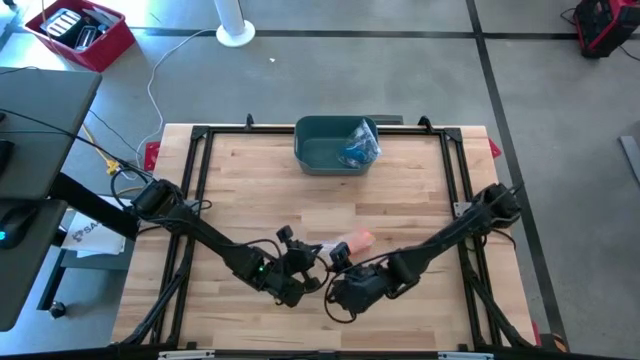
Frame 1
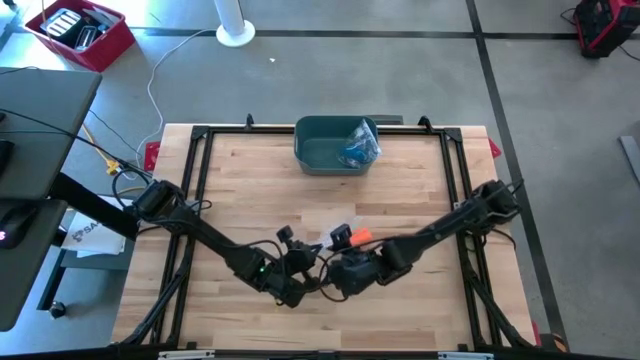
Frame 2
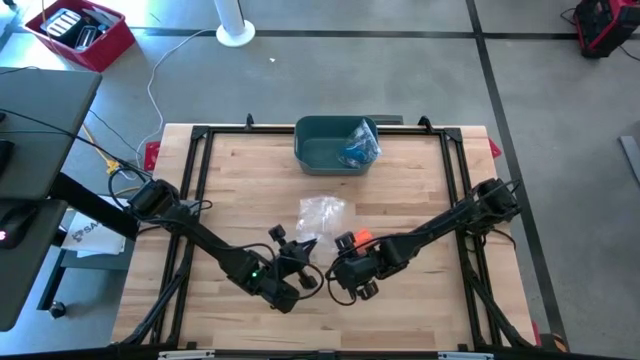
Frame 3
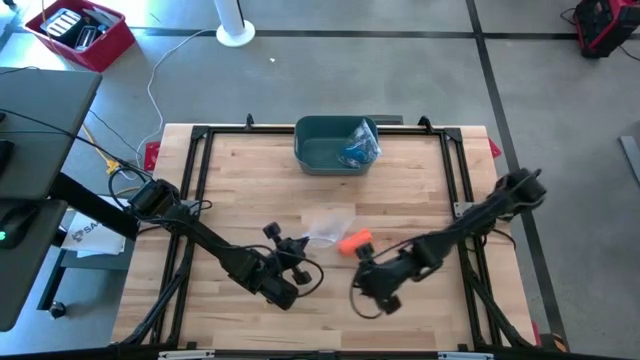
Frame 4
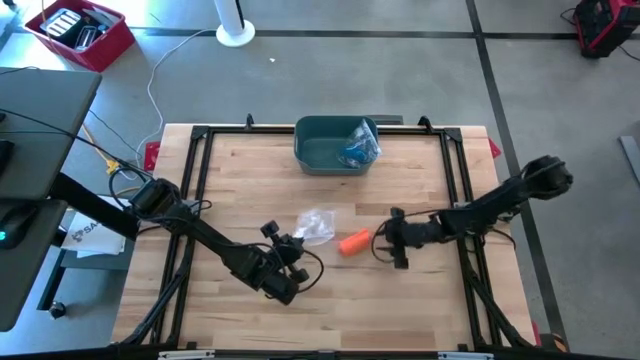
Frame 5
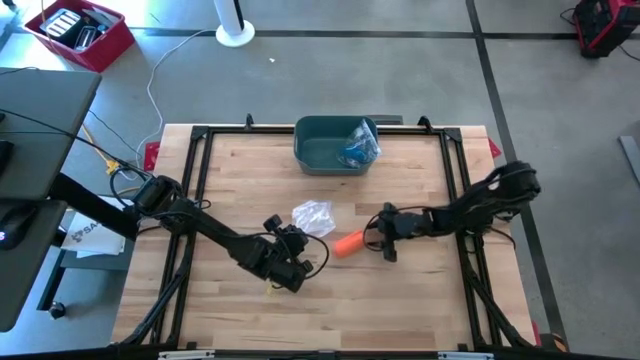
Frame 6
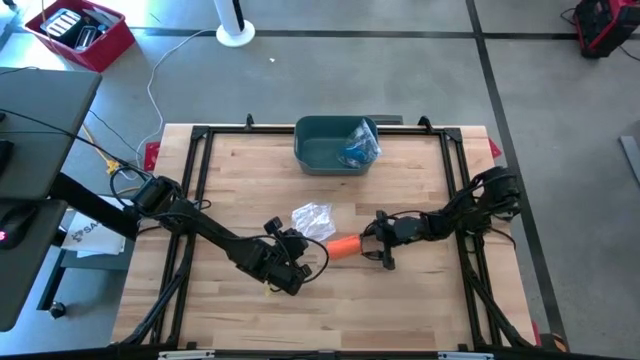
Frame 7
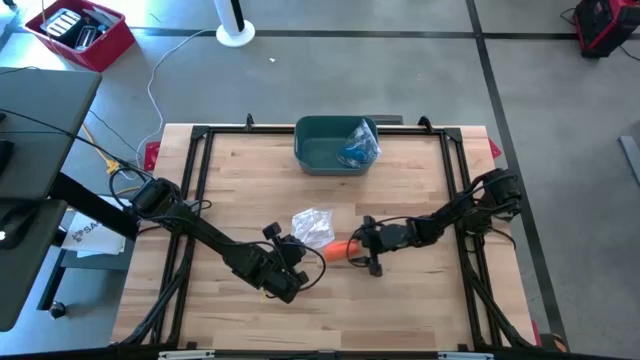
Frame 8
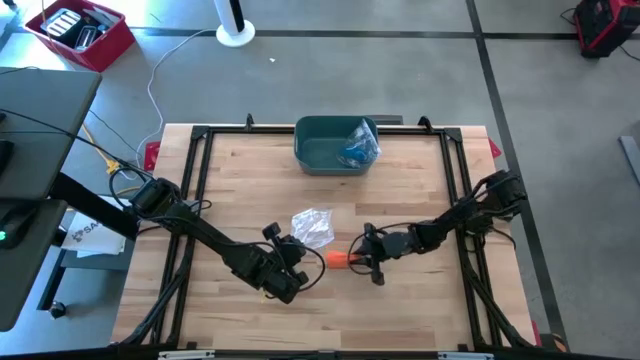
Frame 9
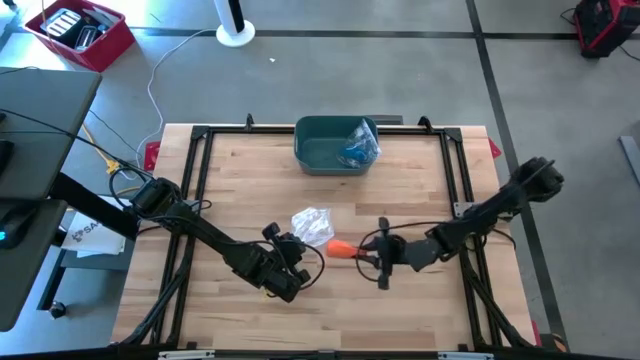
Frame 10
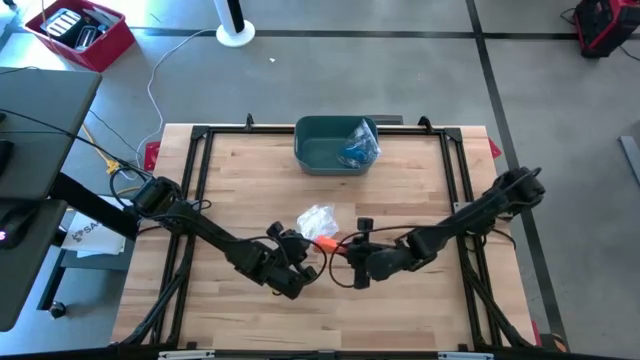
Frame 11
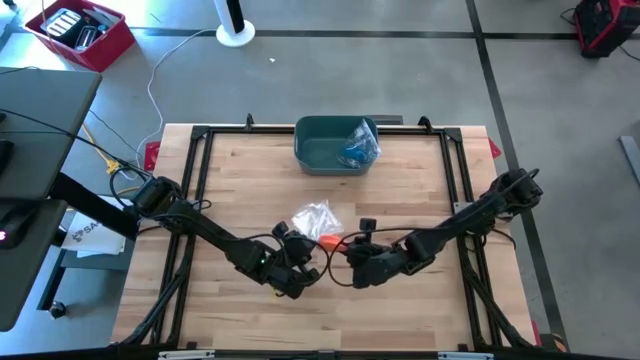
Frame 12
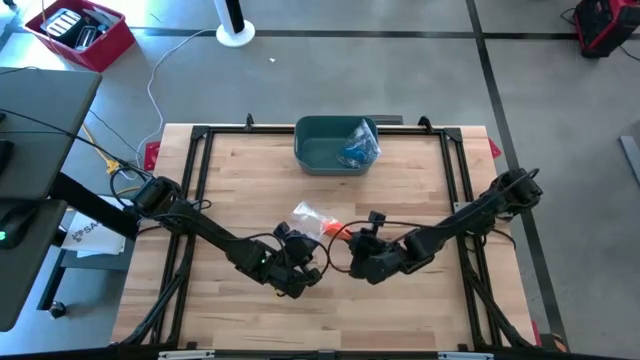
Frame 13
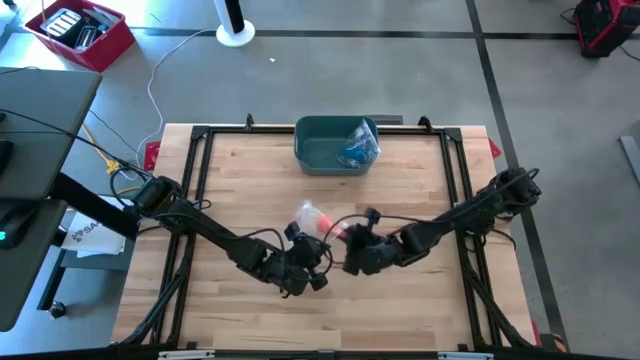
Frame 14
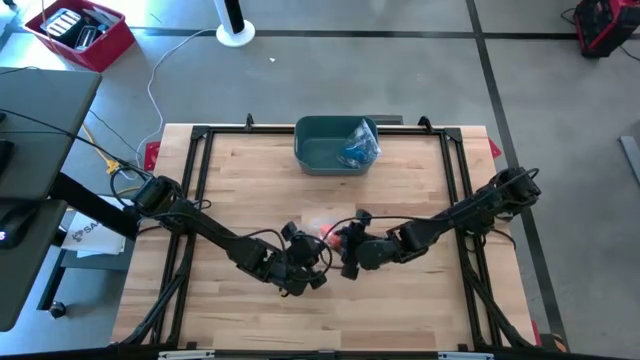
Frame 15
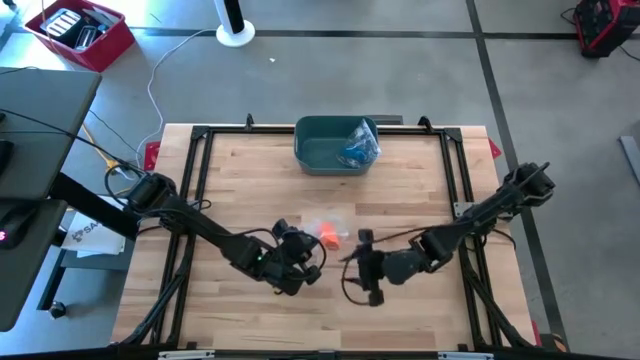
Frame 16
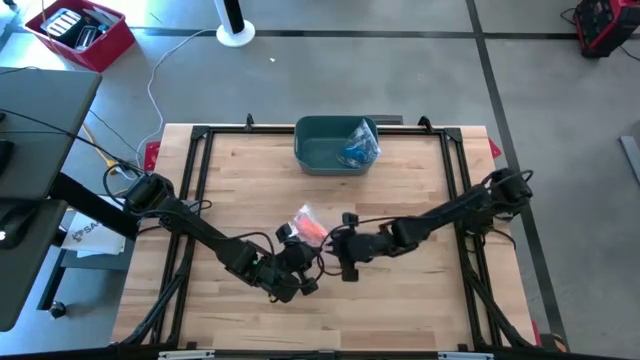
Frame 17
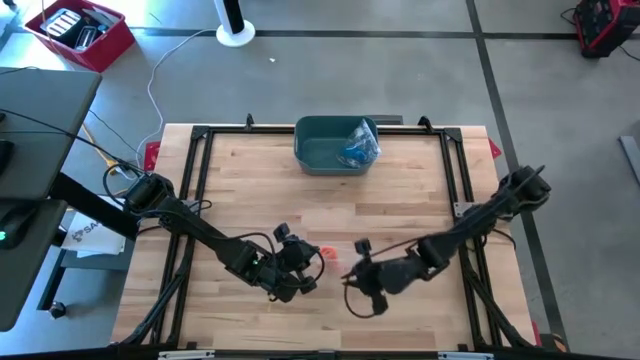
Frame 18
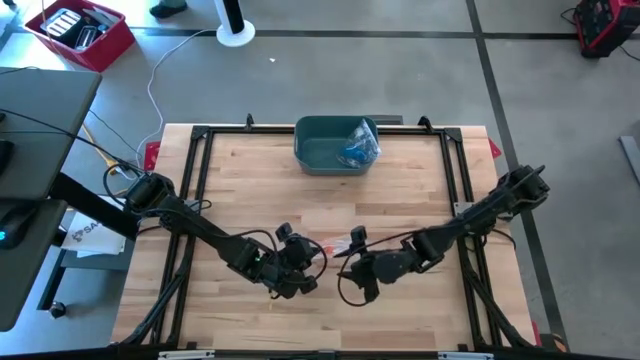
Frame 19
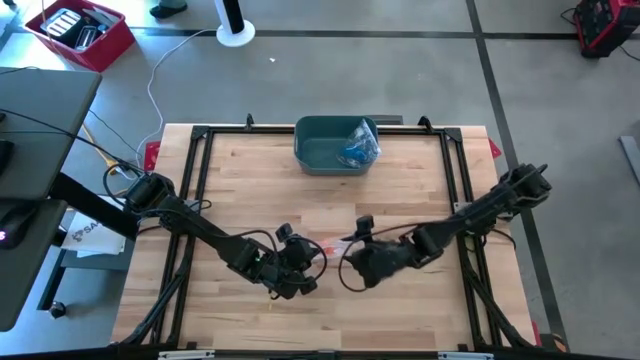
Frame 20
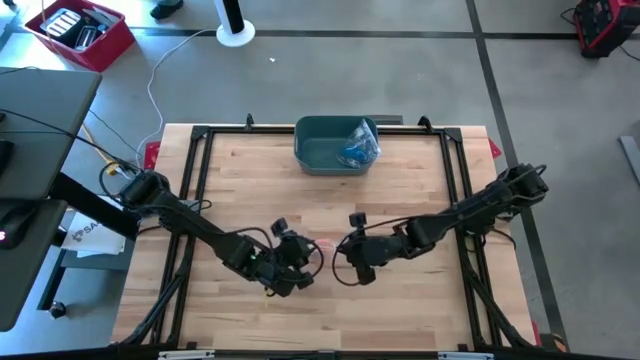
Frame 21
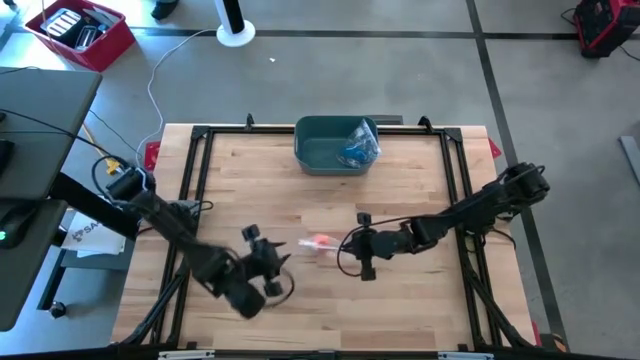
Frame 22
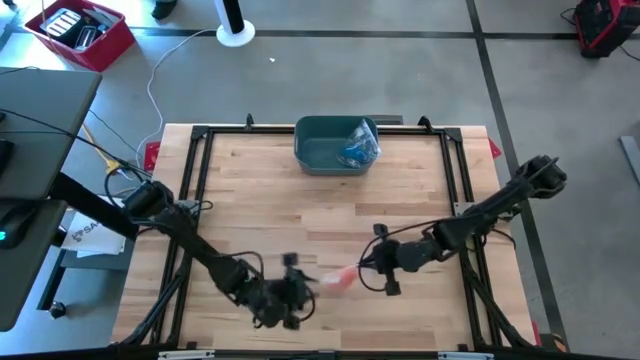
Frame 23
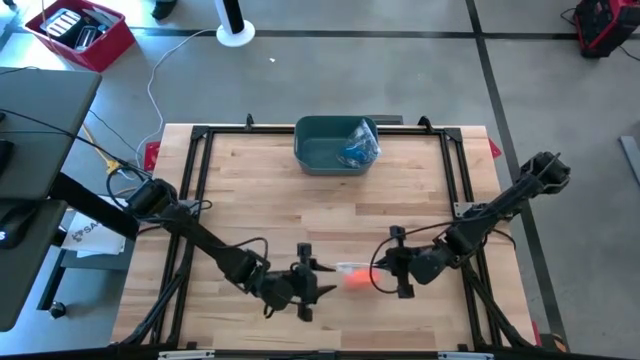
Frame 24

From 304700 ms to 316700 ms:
Task: Roll bandage
Put the rolled orange bandage into the transparent zip bag

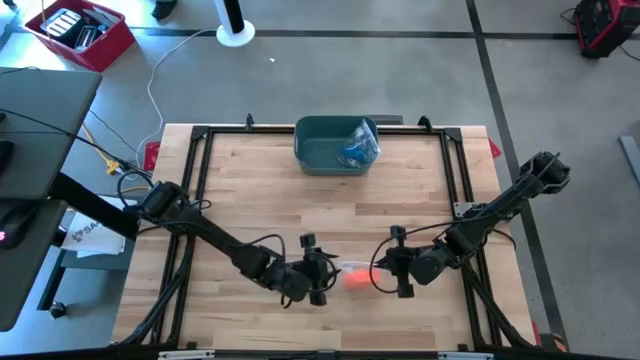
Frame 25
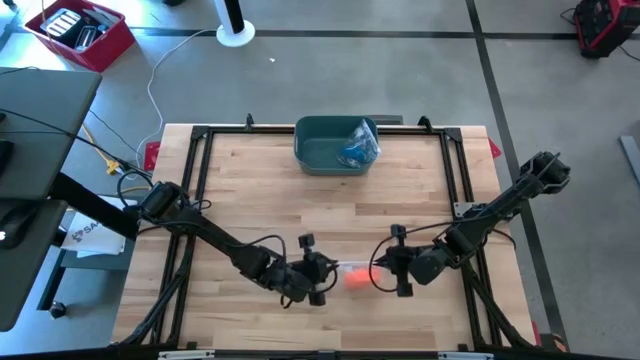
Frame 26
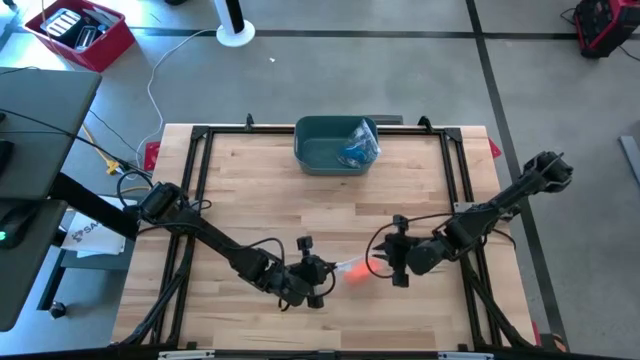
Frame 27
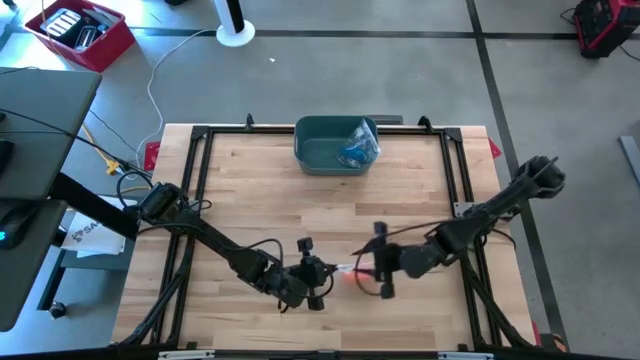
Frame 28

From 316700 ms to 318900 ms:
Close the transparent zip bag

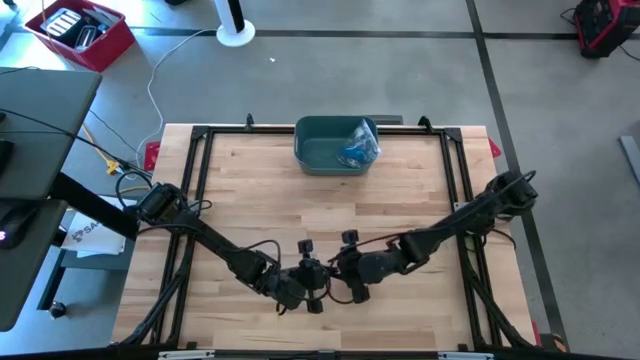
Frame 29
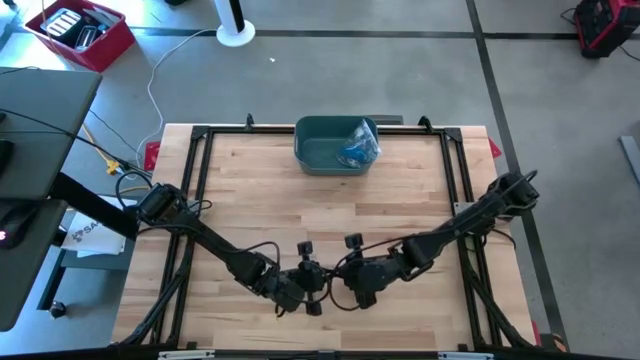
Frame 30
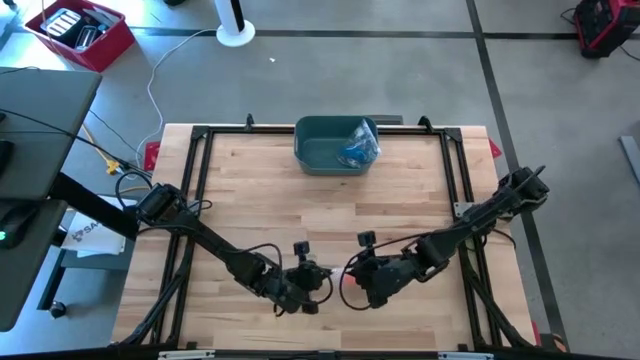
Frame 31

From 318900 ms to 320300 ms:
Close the transparent zip bag

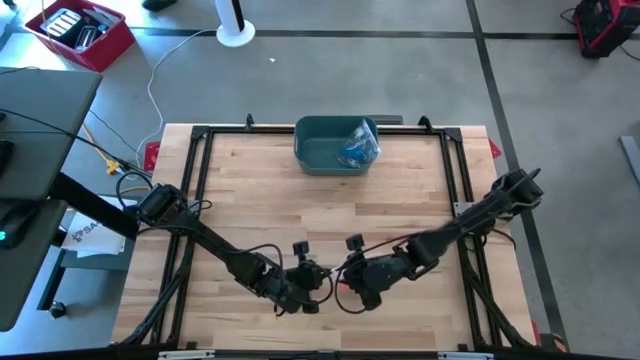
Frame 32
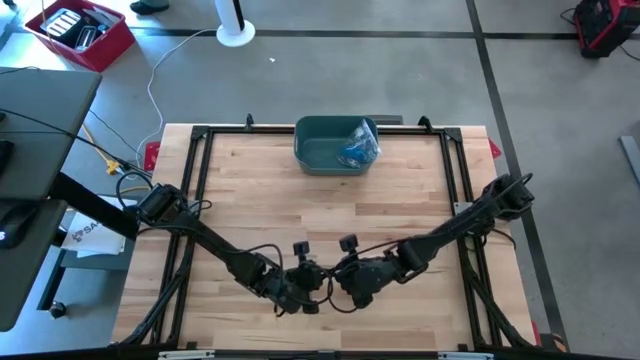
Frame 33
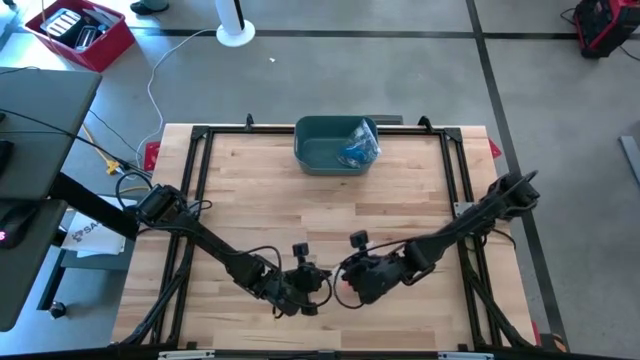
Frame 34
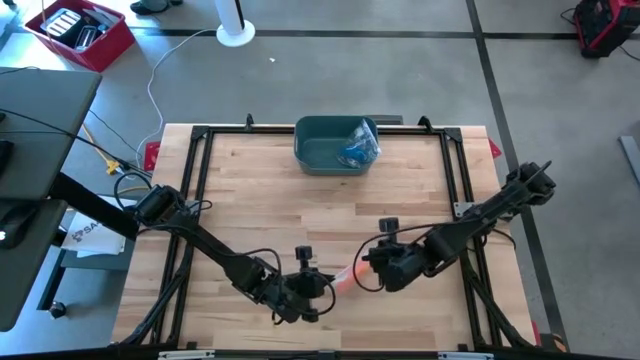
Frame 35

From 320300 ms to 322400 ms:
Close the transparent zip bag

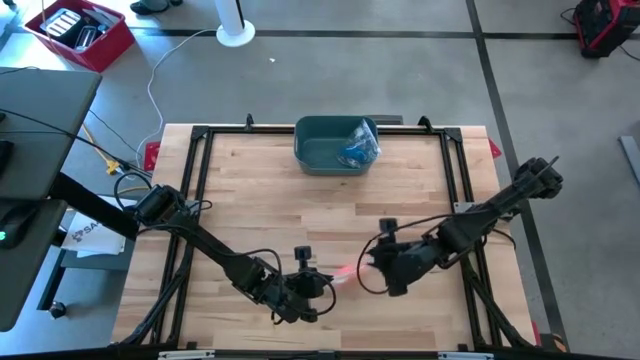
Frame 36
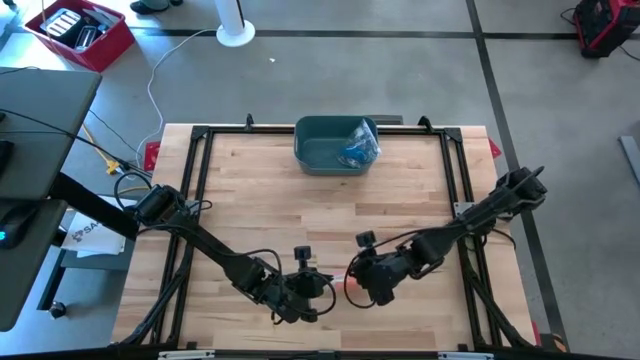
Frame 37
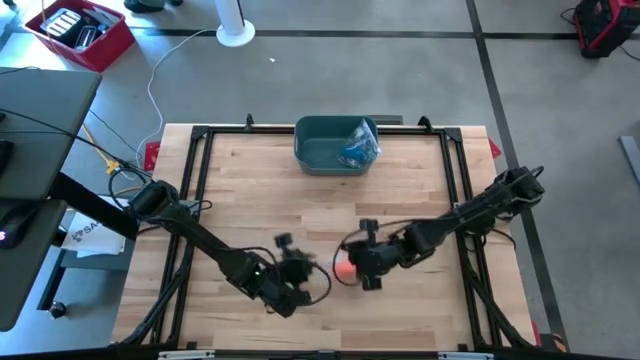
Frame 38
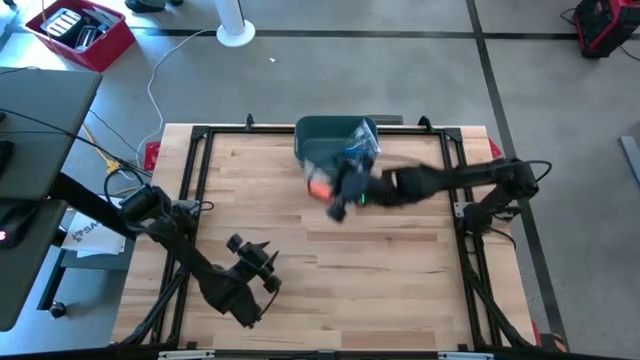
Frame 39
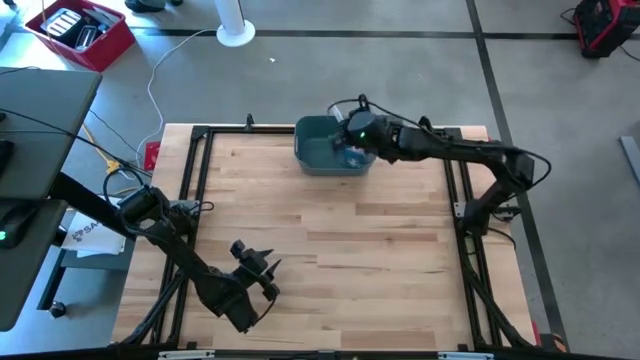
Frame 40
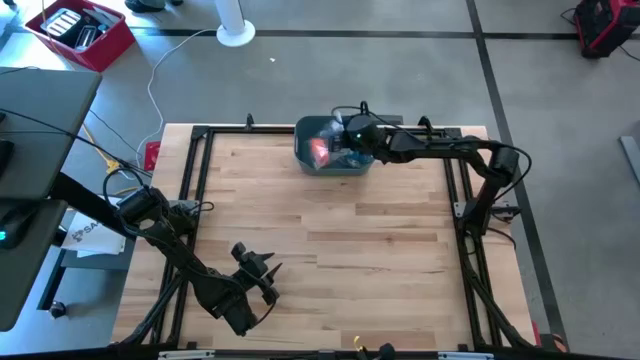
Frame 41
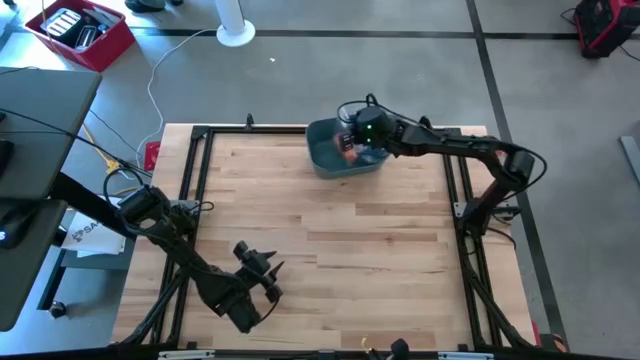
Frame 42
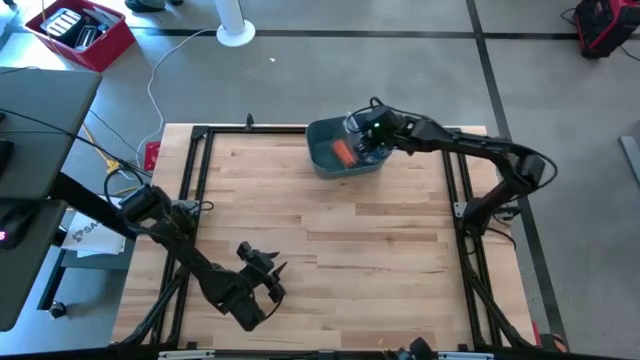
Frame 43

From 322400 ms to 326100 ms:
Put the transparent zip bag with the orange bandage into the blue bin

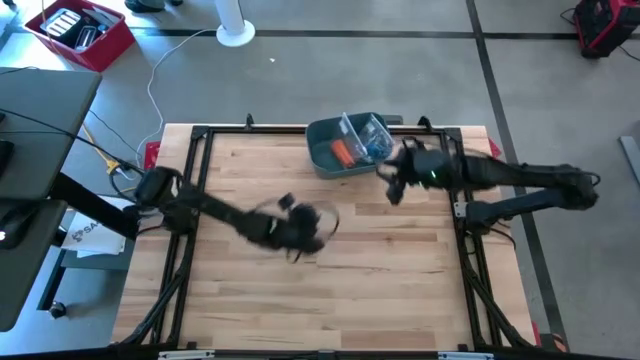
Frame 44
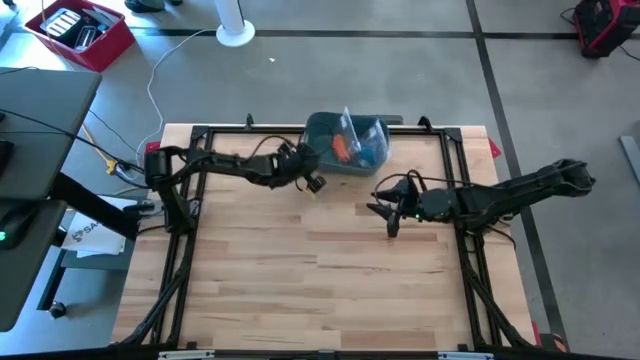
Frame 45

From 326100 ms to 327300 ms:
Adjust the blue bin
